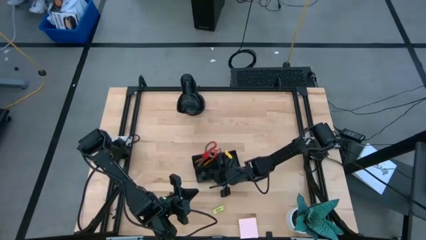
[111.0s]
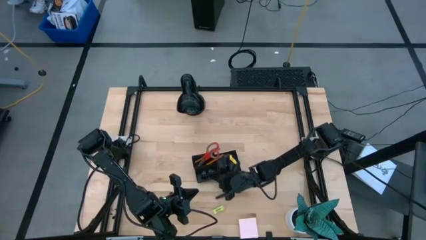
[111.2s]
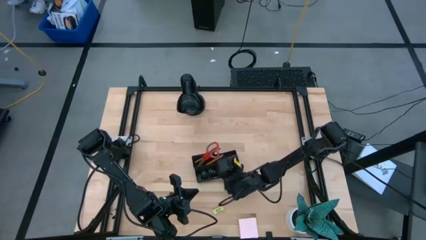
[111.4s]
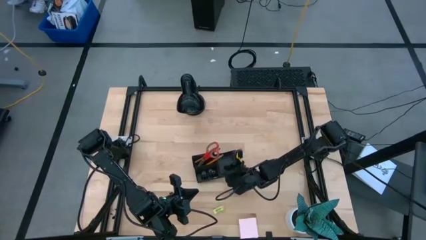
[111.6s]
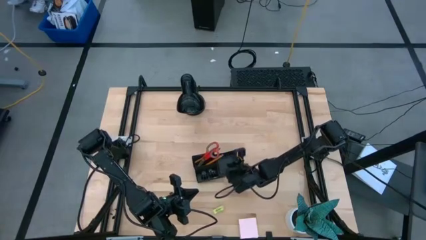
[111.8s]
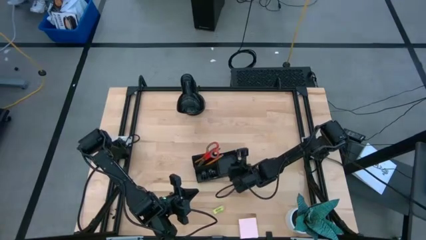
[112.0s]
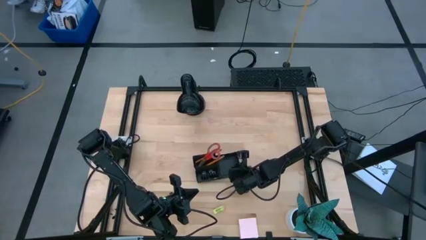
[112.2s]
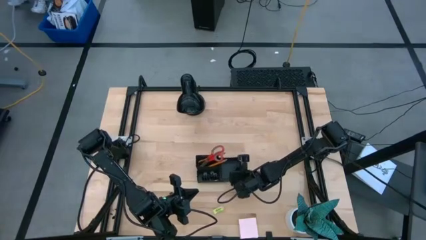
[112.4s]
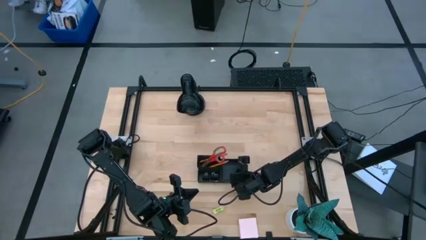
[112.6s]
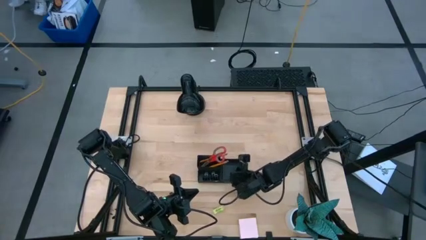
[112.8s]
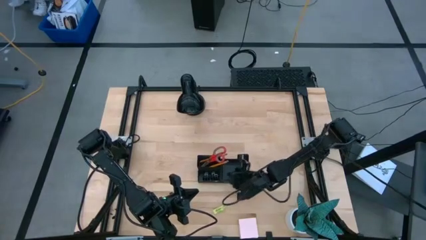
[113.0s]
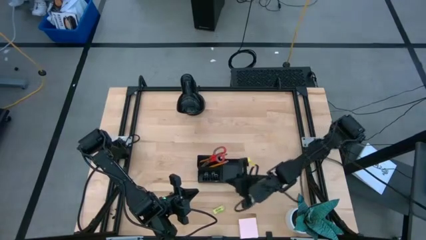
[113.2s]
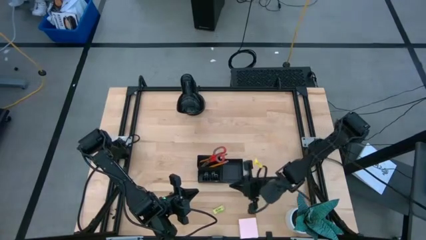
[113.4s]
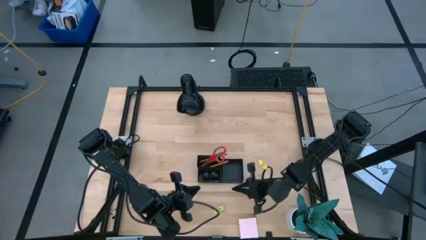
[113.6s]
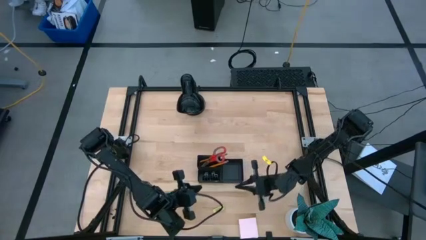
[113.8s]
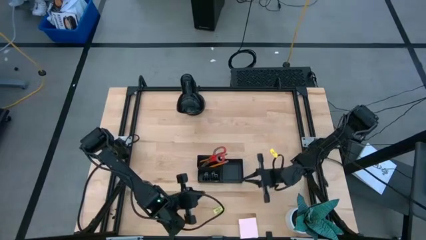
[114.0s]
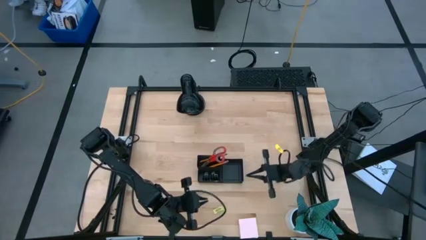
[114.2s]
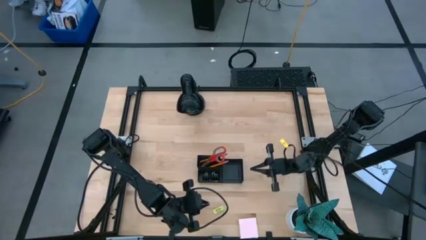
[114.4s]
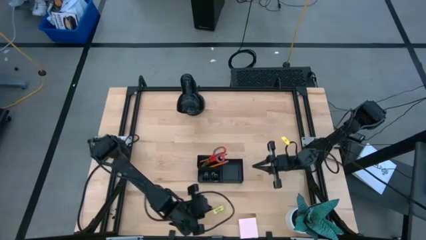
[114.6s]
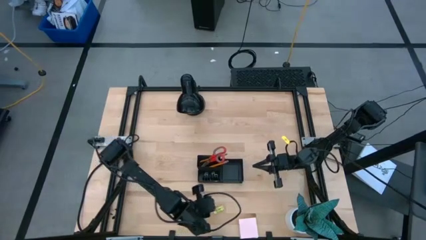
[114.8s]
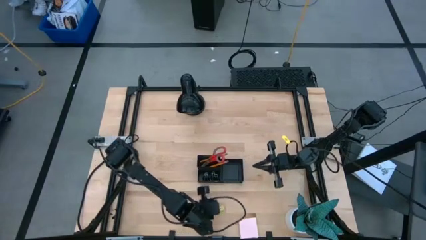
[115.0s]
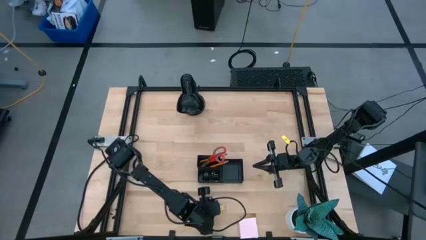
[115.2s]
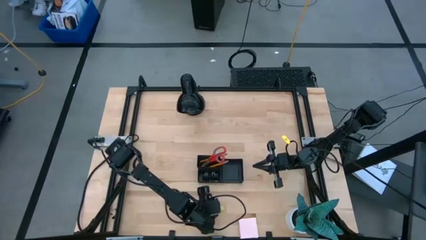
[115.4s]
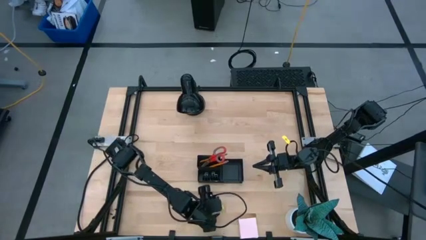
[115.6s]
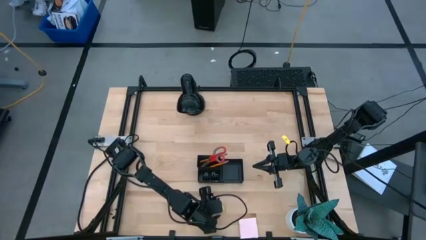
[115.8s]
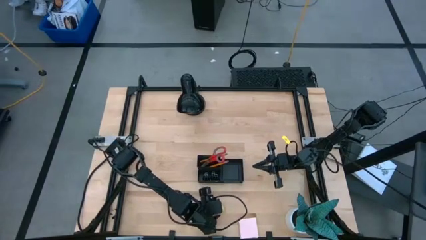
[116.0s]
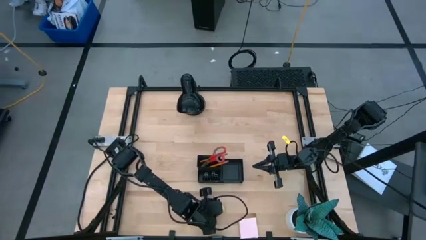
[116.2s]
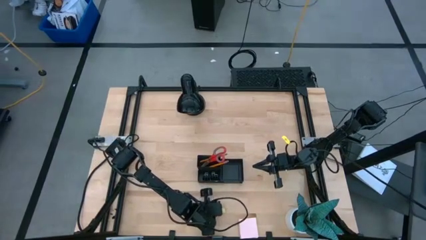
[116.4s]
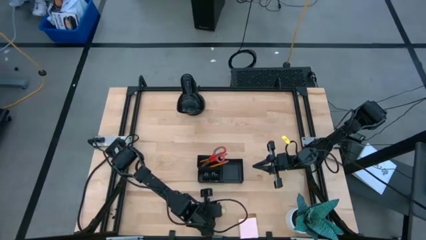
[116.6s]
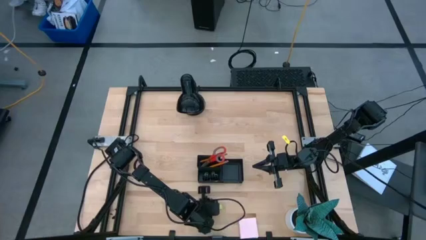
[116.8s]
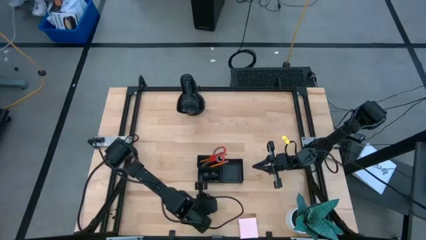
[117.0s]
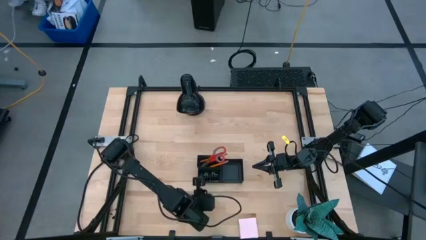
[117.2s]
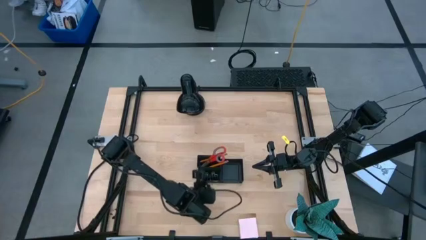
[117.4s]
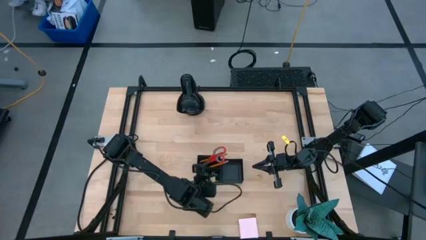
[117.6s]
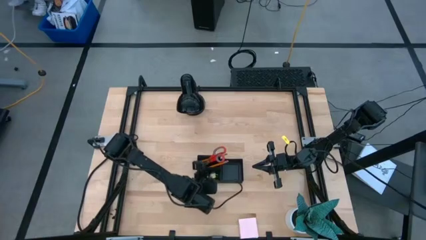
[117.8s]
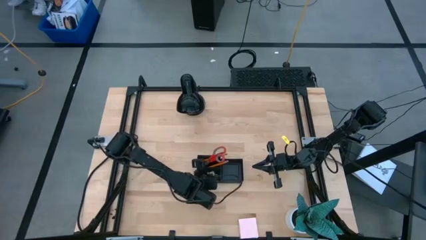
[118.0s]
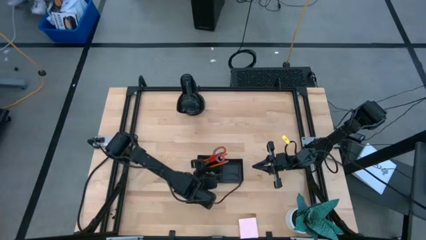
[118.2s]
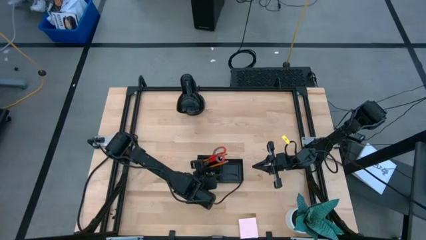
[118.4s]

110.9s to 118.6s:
Task: Pick and place office supplies into organizer
Put the yellow eraser into the desk organizer

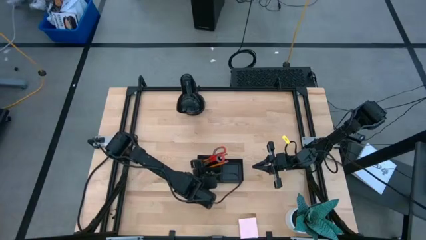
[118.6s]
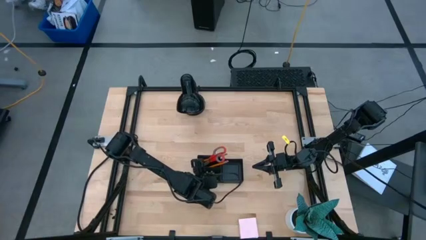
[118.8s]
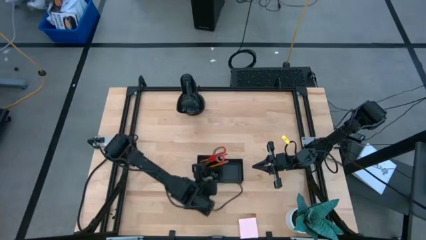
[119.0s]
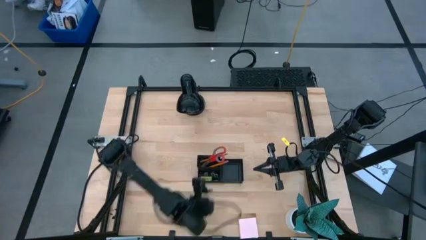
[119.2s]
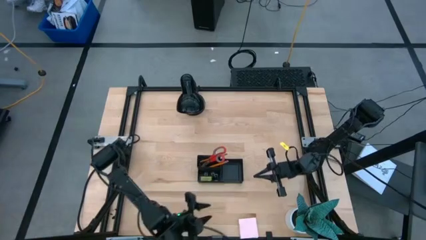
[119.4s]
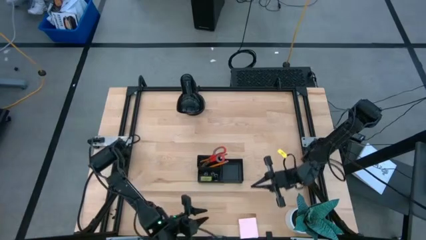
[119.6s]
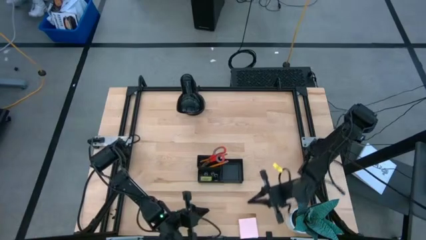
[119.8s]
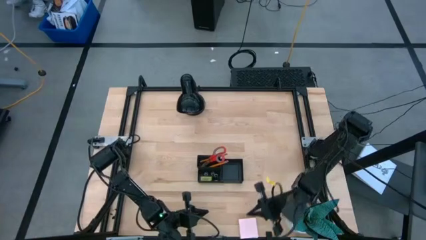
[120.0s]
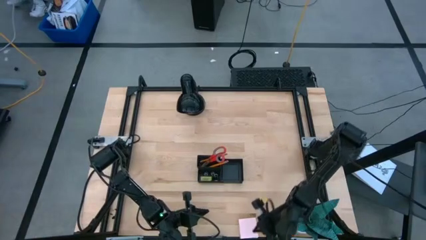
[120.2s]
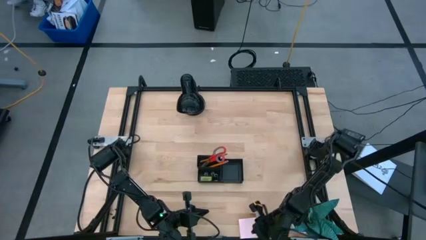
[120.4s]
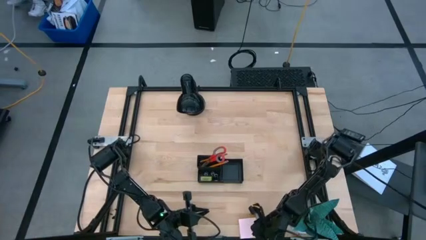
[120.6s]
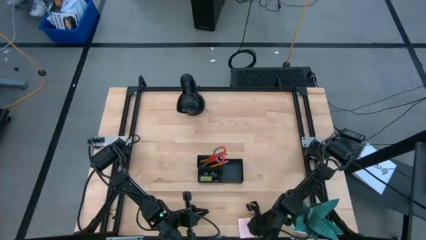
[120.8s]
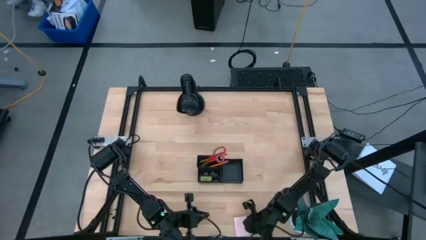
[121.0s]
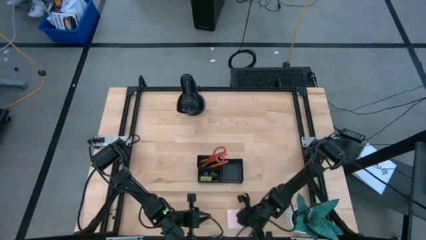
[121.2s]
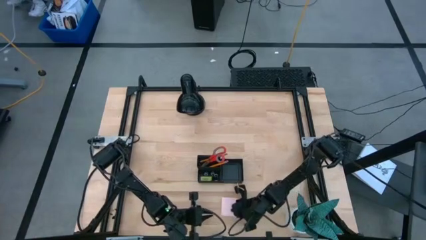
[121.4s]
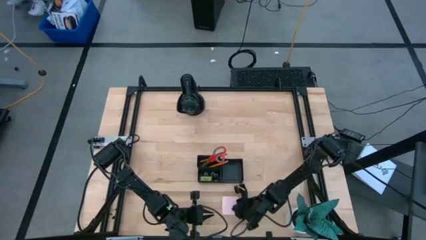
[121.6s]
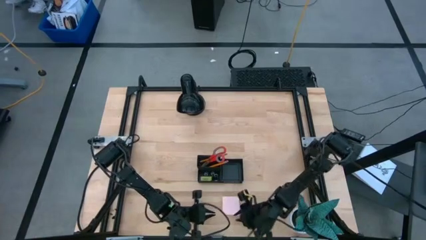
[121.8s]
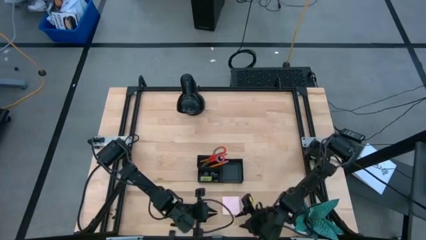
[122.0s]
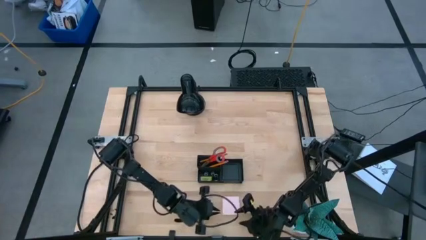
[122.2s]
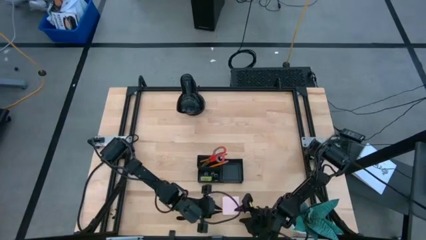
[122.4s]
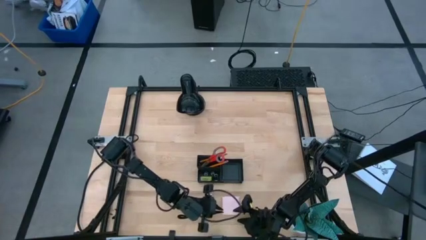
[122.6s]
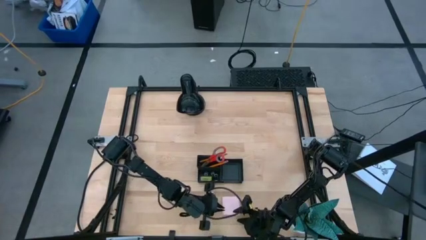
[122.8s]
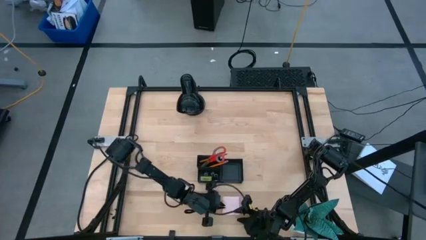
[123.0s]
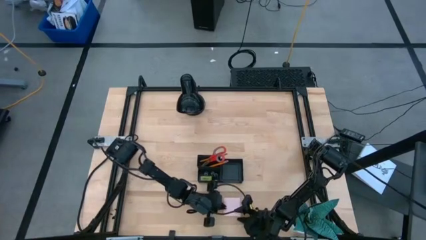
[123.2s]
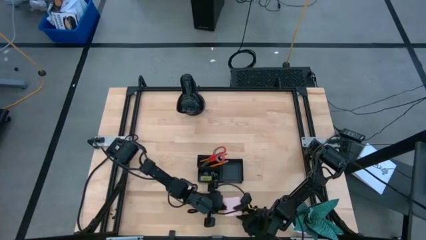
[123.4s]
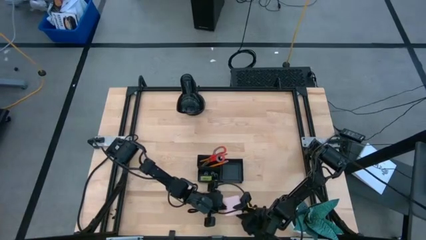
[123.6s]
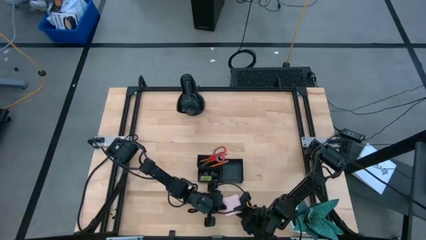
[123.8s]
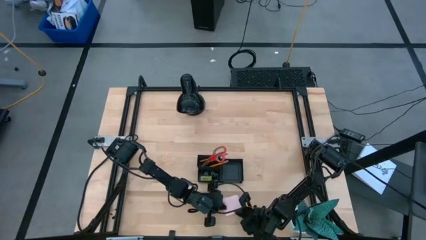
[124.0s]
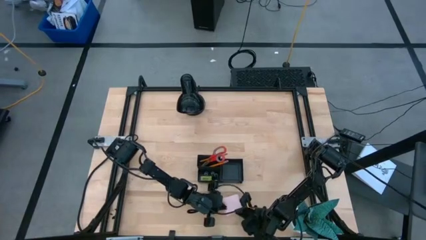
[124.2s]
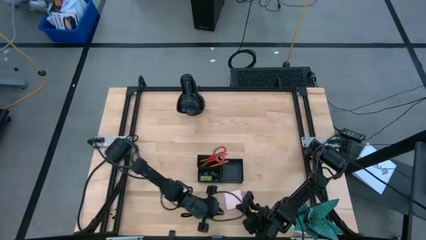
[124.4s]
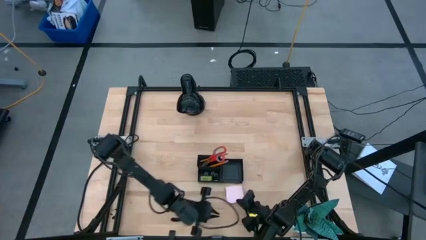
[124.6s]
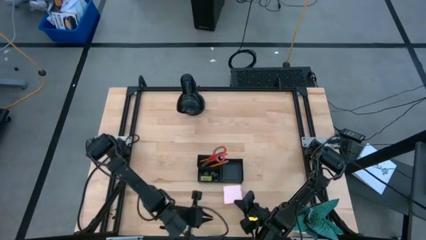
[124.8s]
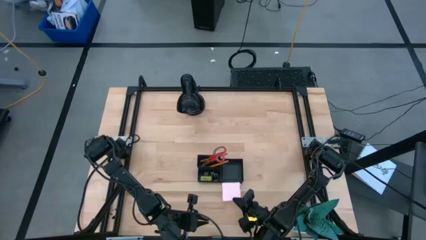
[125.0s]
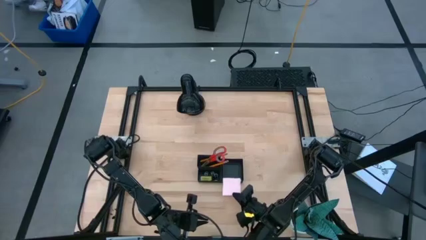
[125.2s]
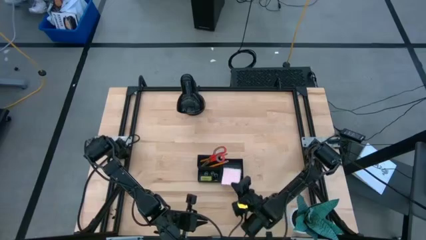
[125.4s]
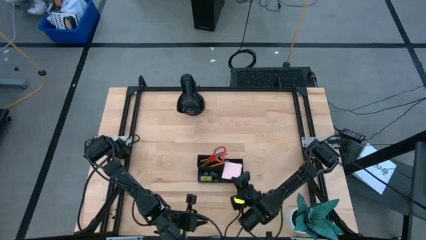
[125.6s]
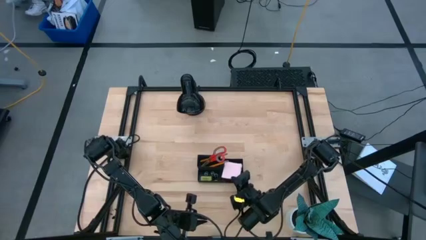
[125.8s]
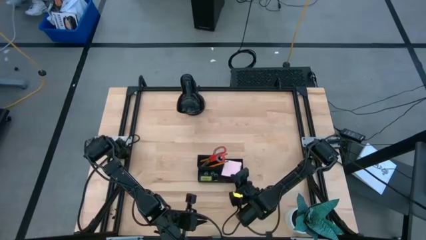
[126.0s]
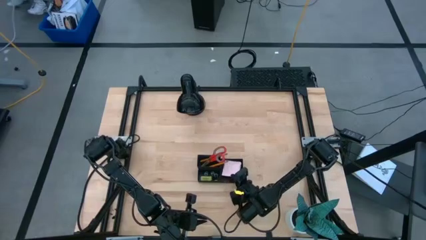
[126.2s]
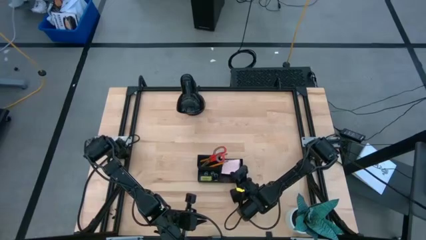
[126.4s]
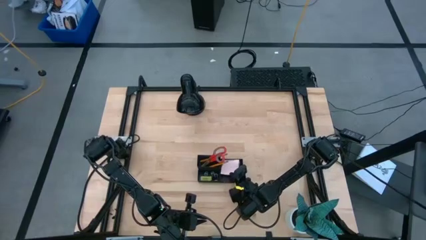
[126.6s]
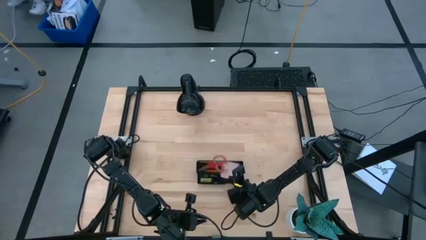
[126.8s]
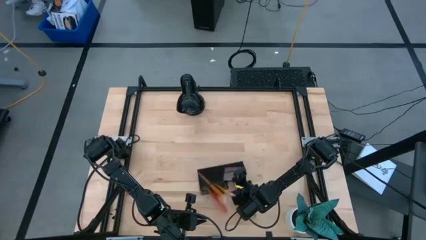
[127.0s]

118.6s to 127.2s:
Put the pink sticky notes into the desk organizer

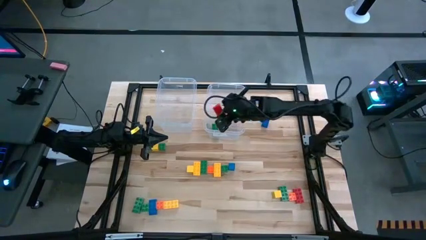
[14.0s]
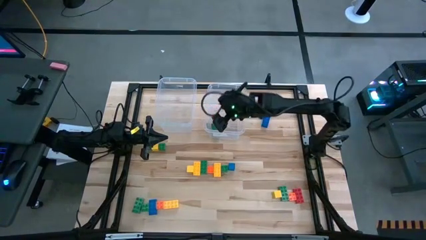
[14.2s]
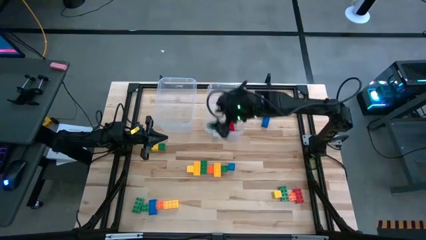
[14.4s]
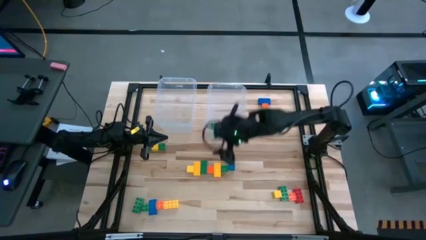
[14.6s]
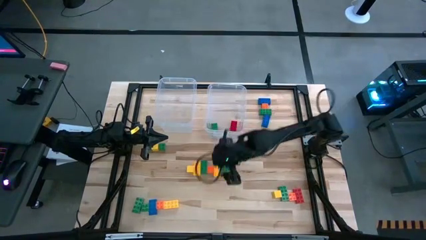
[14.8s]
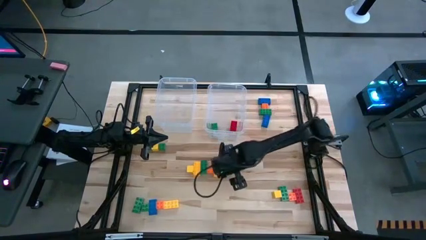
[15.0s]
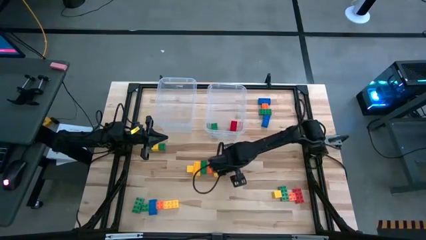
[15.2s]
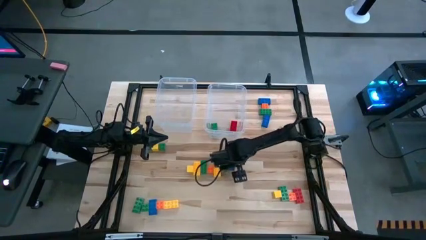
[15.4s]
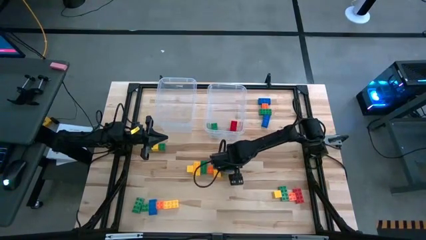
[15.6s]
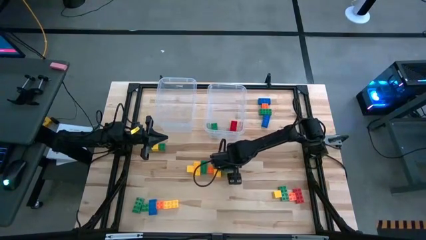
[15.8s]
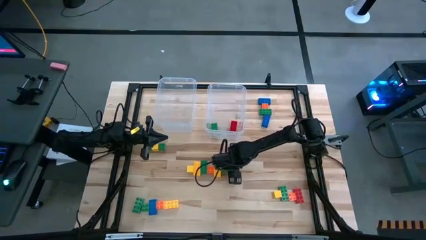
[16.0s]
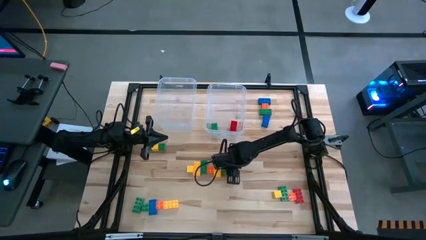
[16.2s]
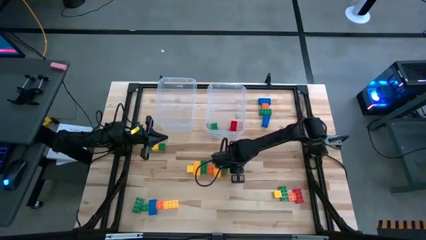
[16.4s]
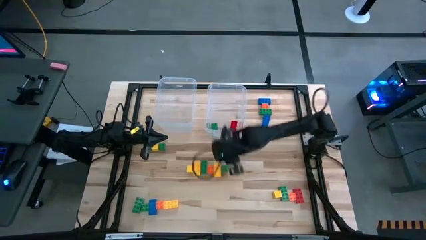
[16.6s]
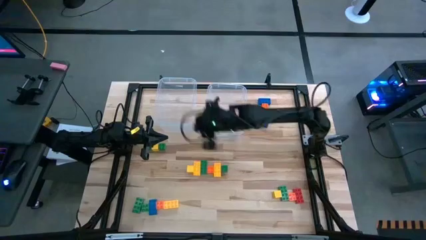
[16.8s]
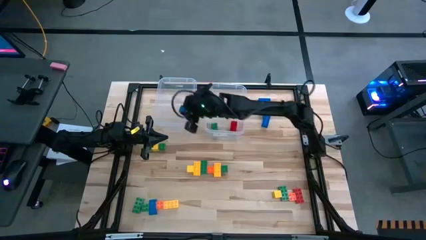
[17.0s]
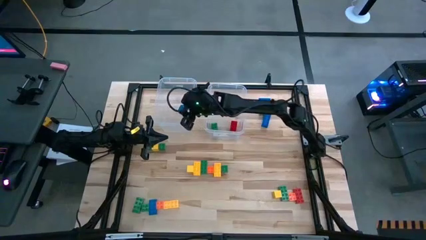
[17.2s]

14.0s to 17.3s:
Task: Sort blocks by size
Put the blue blocks into the left transparent bin
